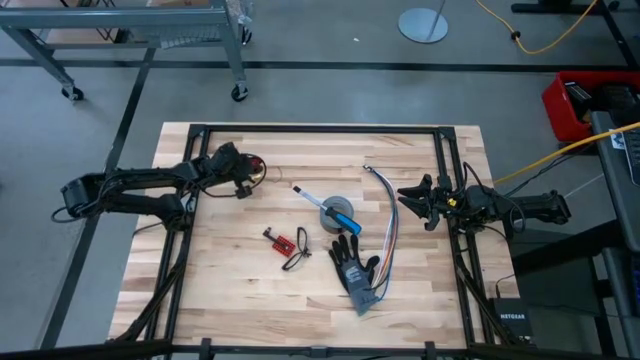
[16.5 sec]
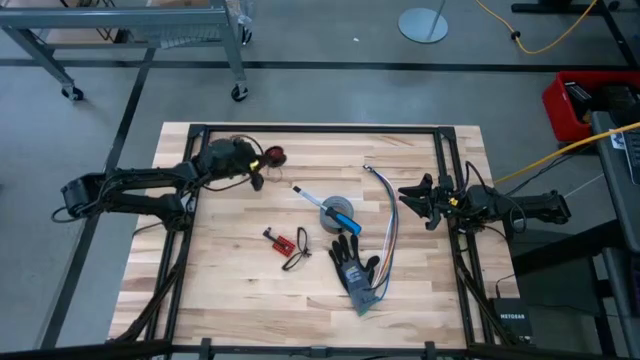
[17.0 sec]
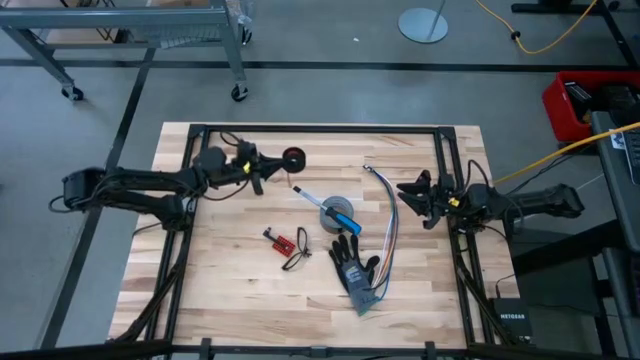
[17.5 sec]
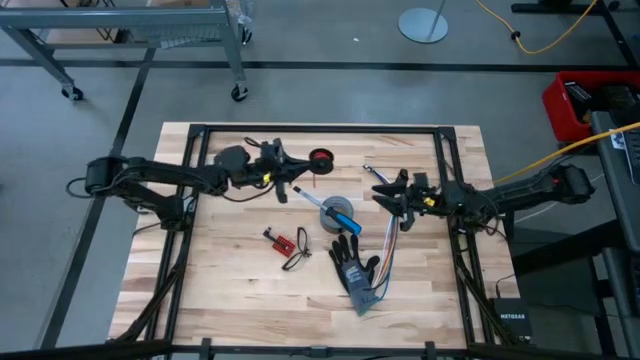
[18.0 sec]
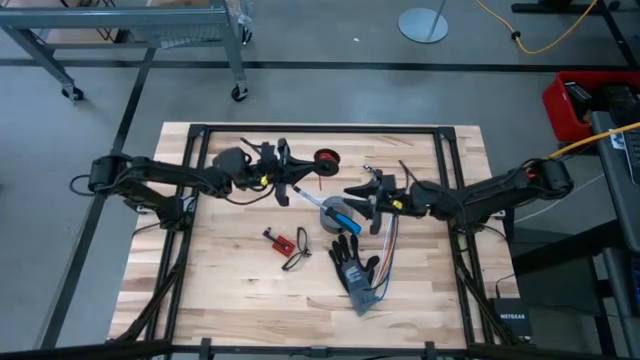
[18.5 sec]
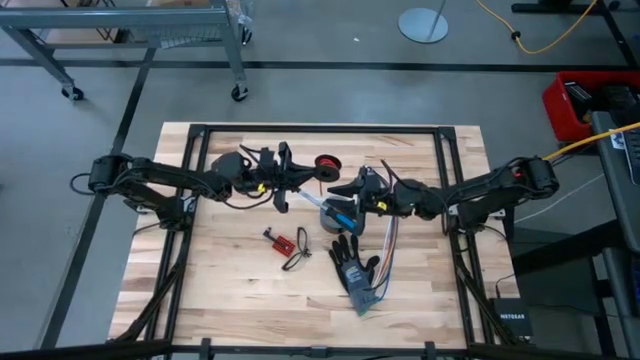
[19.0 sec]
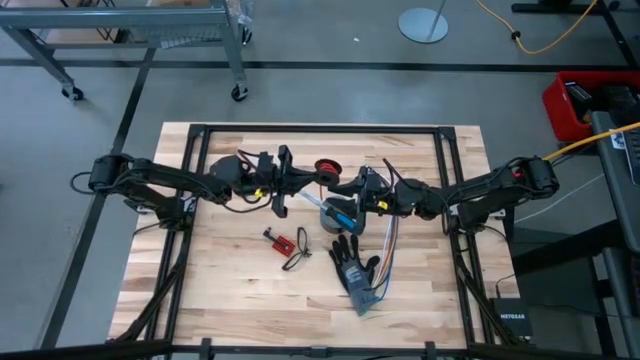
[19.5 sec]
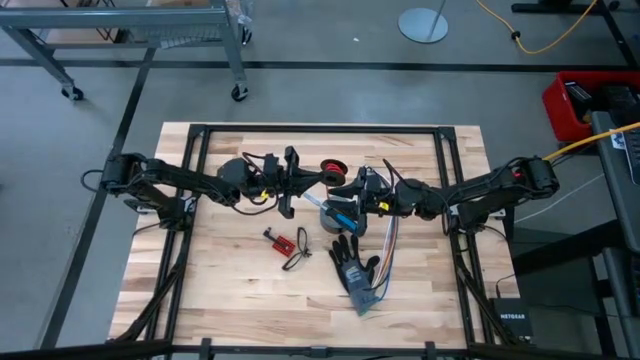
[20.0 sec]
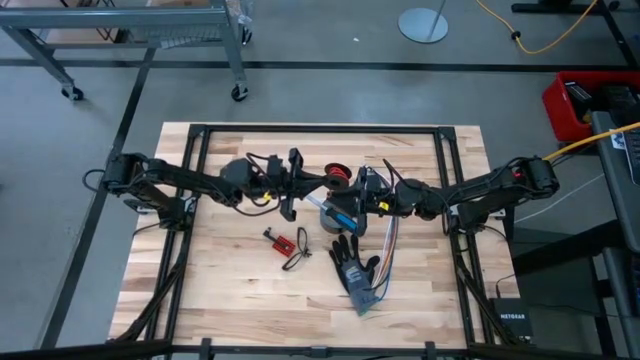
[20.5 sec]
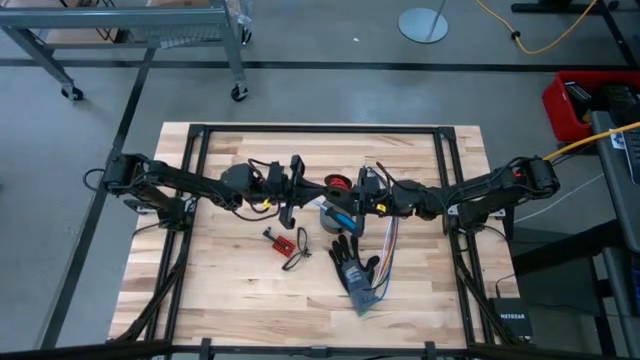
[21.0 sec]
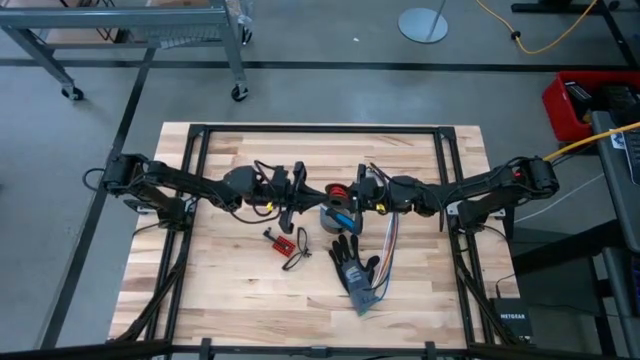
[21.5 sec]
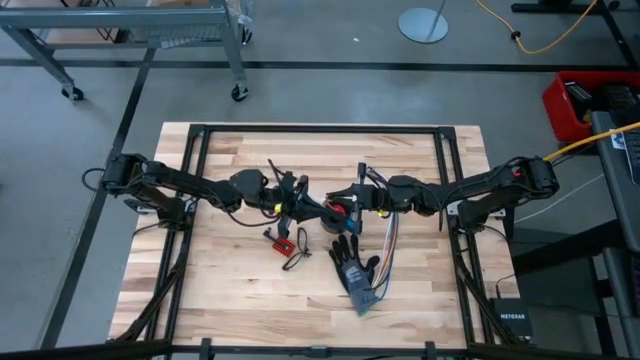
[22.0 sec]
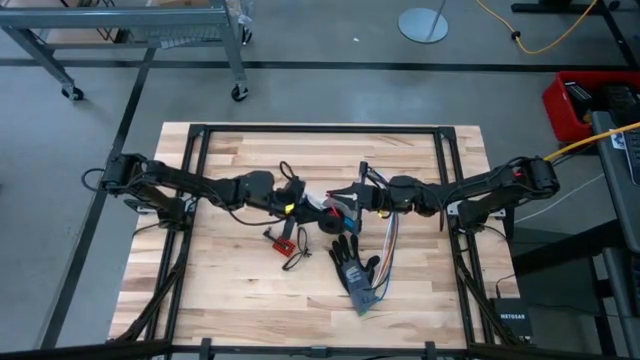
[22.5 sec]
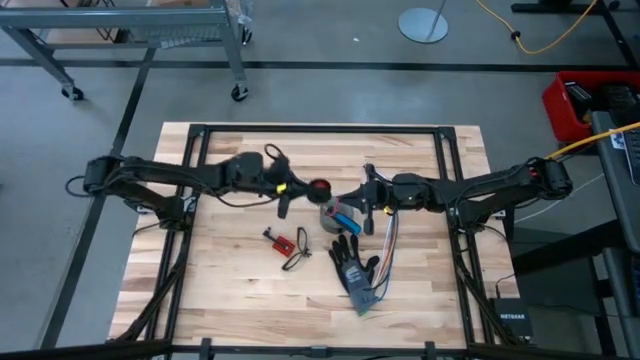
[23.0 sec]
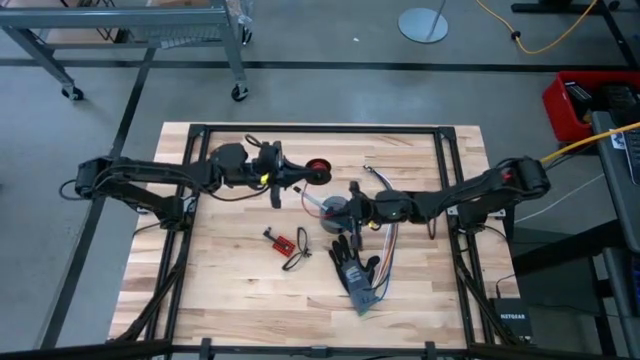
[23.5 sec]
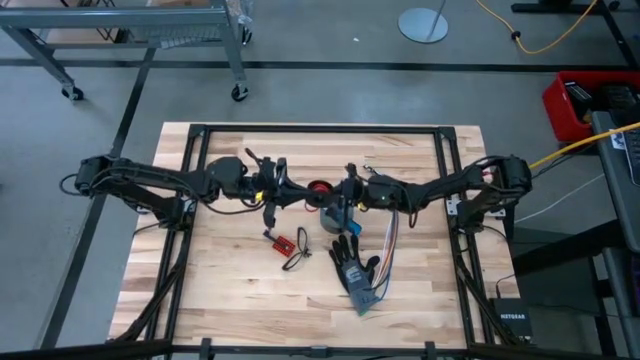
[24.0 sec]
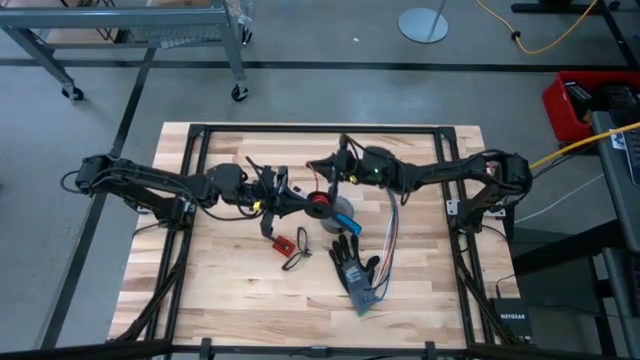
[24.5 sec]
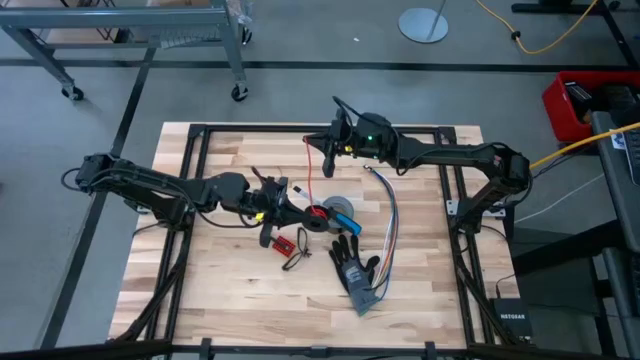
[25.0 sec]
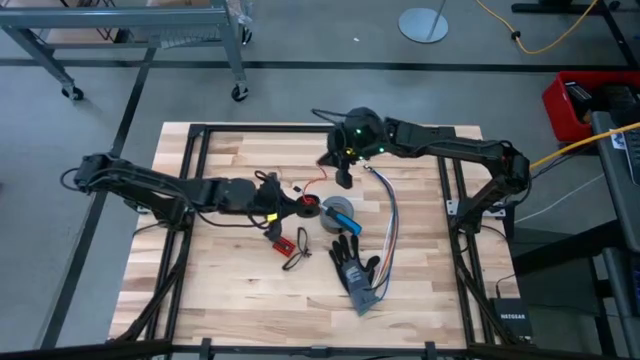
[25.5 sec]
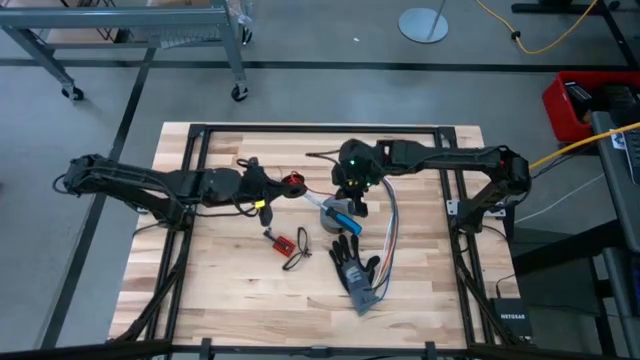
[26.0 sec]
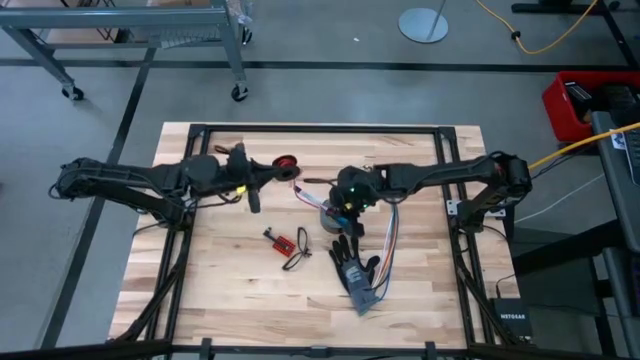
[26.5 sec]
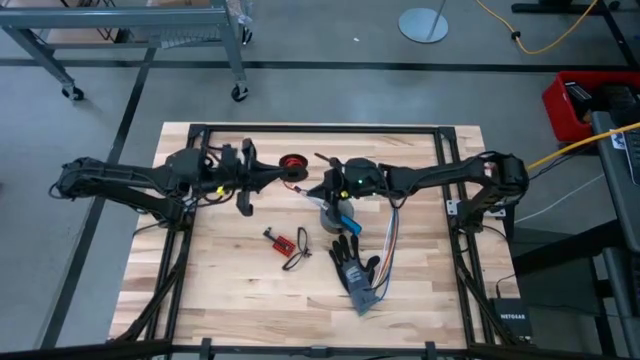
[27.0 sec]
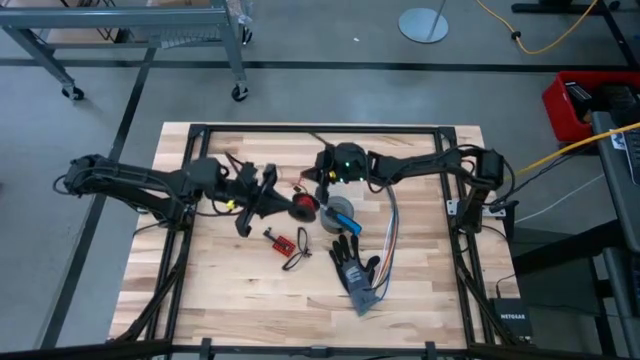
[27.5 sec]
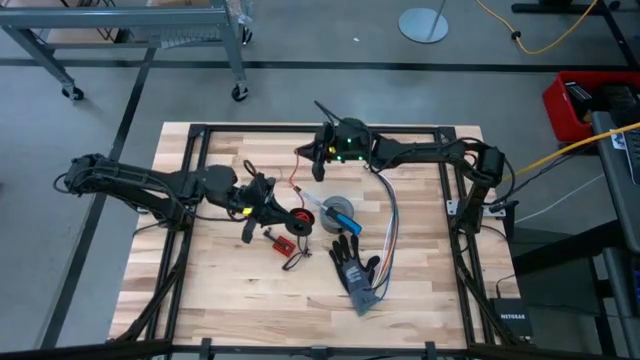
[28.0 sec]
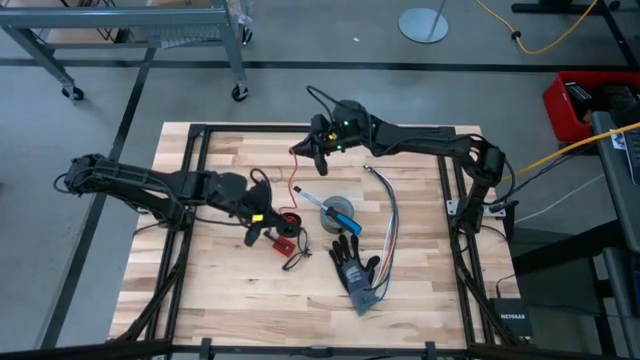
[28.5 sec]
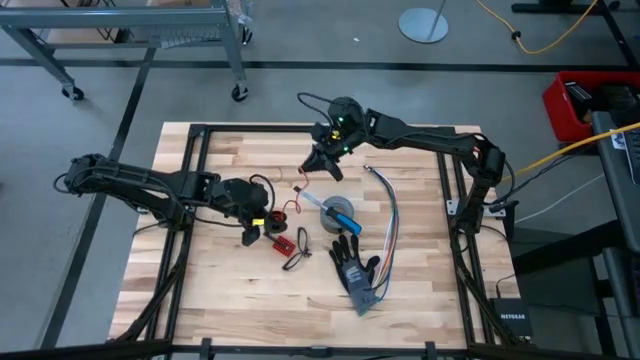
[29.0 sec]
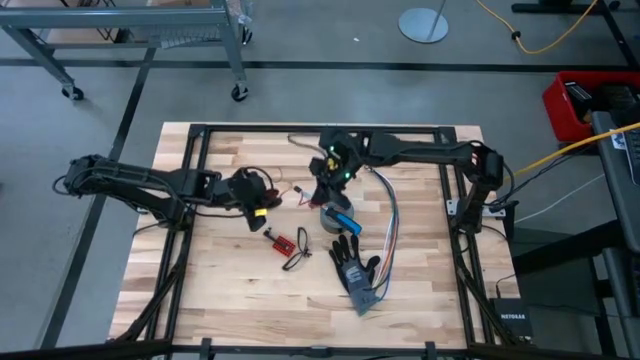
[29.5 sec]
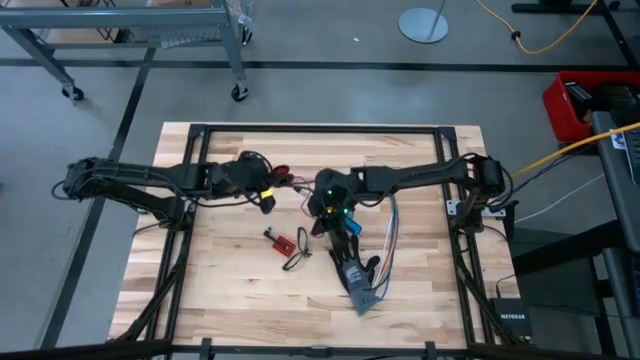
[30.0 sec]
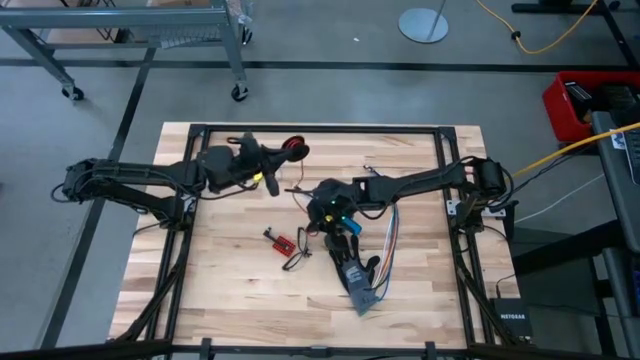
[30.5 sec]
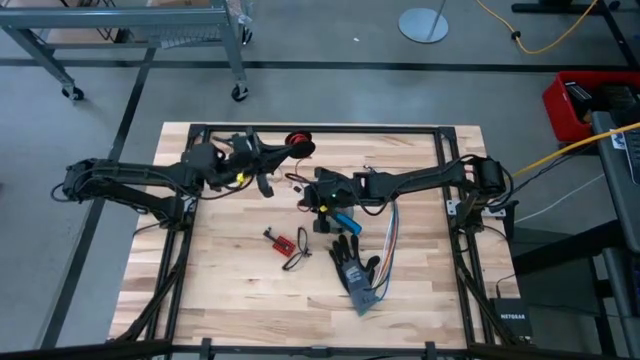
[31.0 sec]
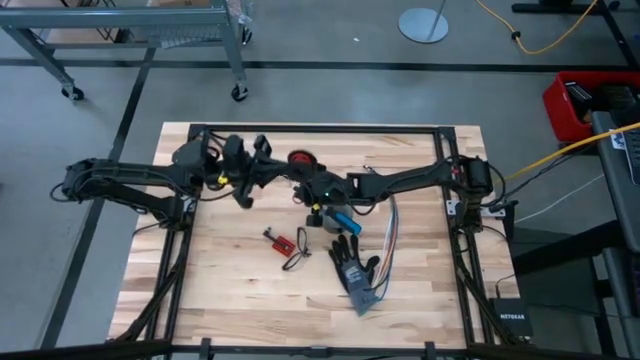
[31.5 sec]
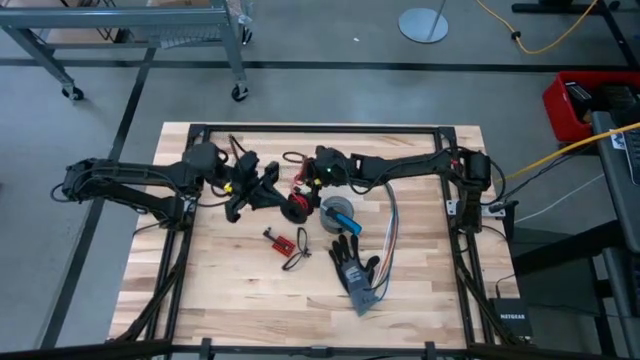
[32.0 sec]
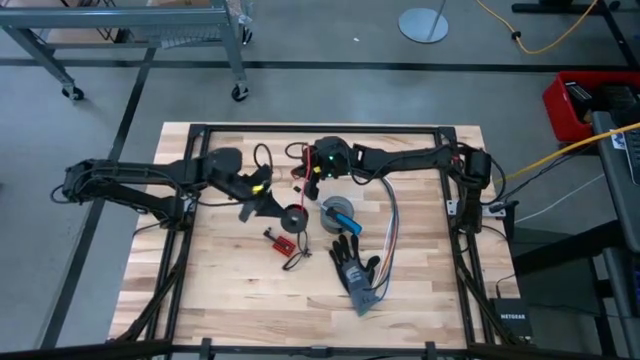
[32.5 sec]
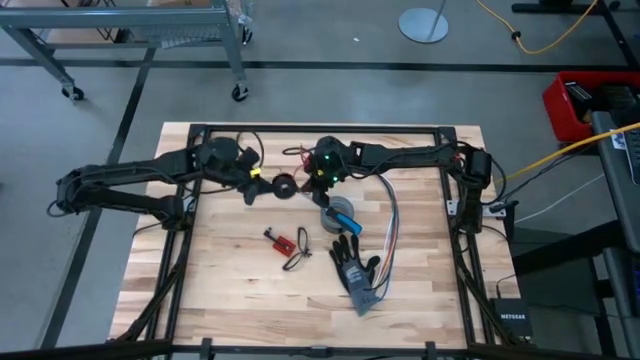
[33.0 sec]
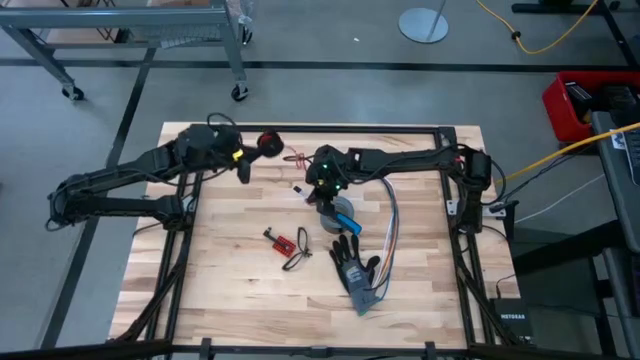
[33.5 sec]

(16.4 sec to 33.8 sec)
Task: Coil cords
Uncoil the red wire from the spool

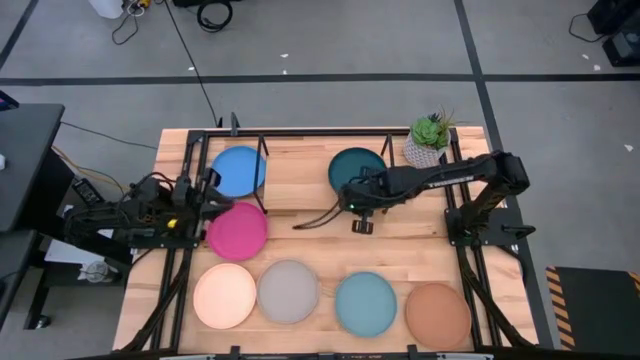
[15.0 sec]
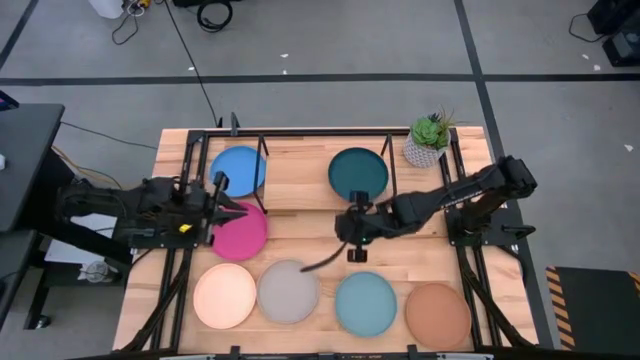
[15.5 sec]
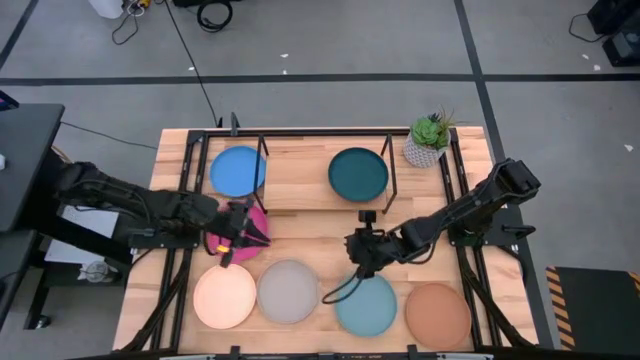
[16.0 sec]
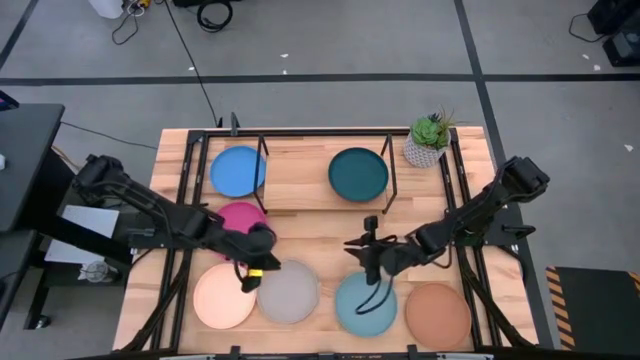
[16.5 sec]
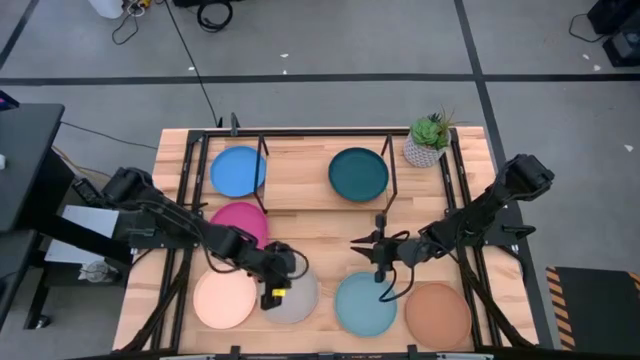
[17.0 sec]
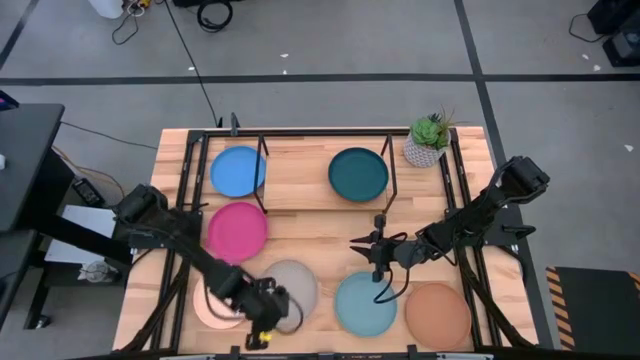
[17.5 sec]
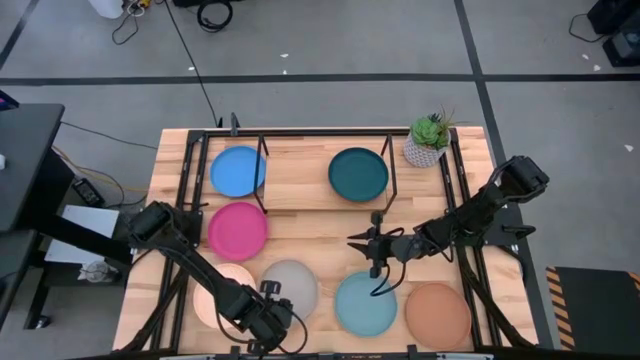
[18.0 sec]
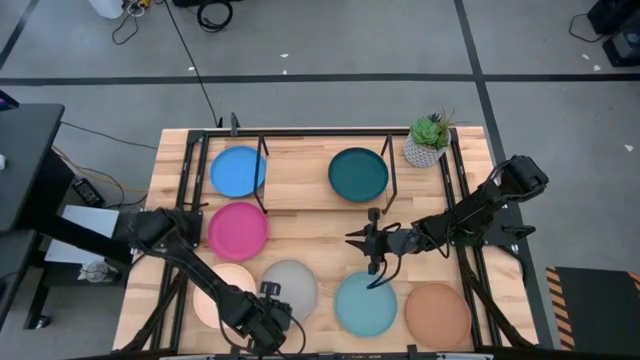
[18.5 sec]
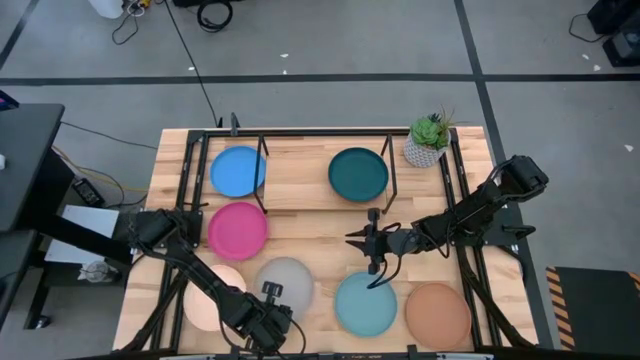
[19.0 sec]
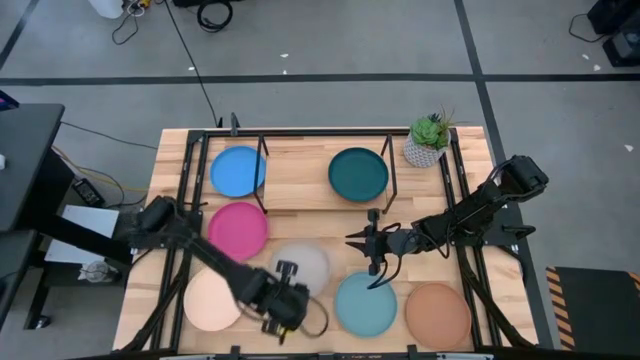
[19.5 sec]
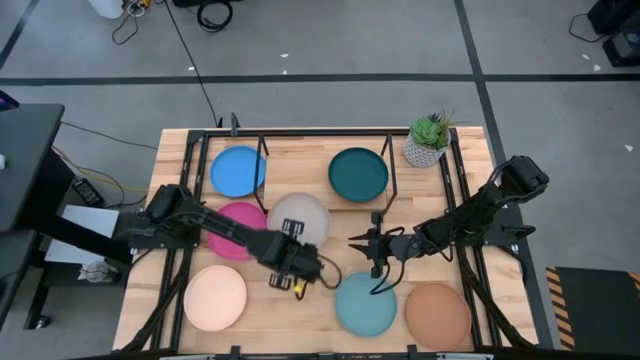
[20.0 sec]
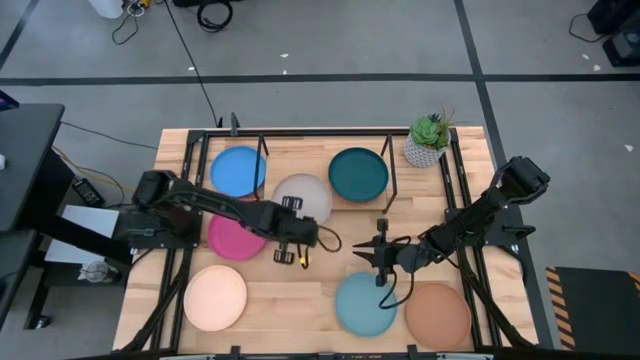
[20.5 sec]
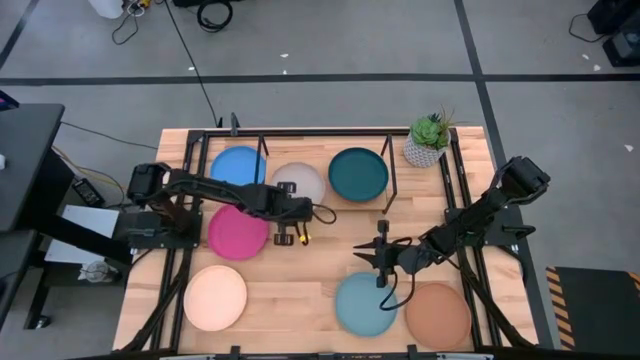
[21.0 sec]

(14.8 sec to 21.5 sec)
Task: Place and stack plates onto a shelf
Put the gray plate on the shelf
